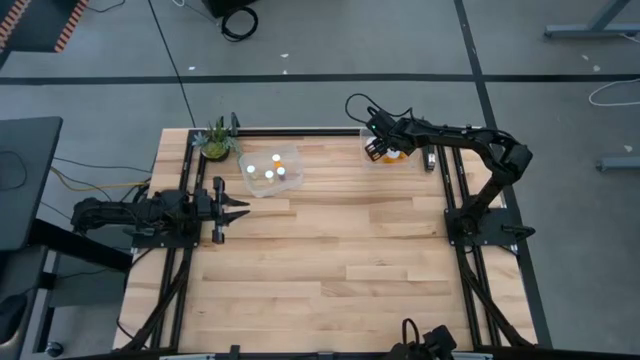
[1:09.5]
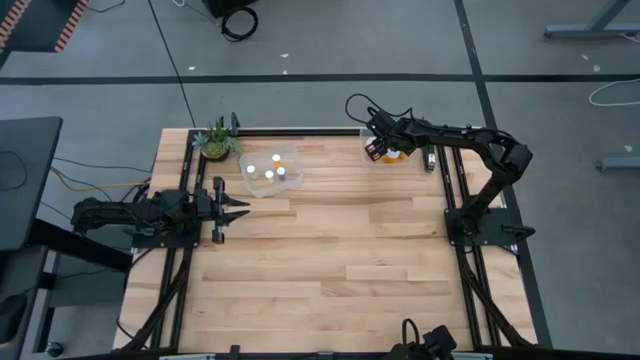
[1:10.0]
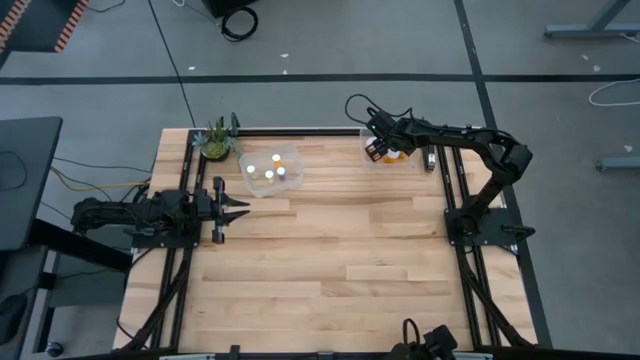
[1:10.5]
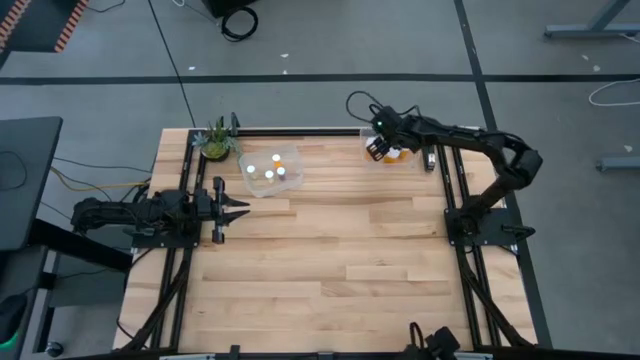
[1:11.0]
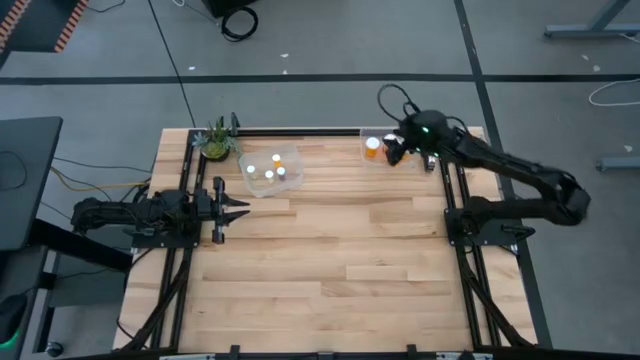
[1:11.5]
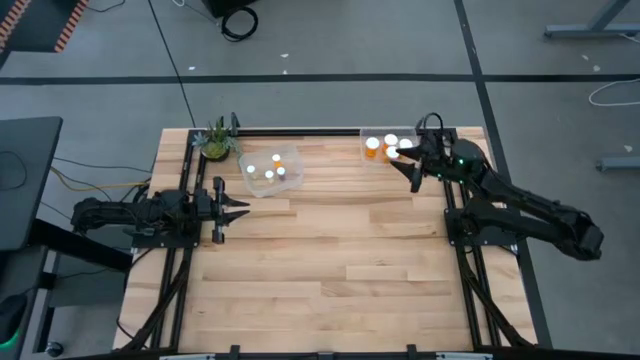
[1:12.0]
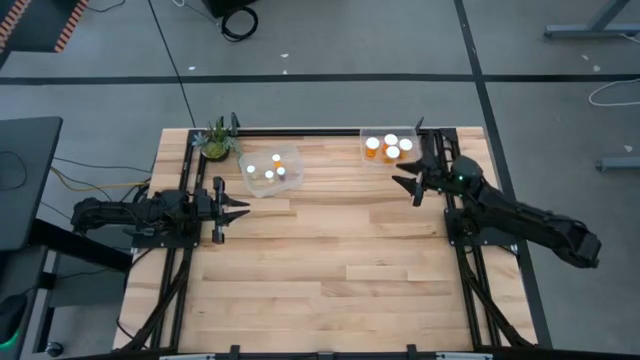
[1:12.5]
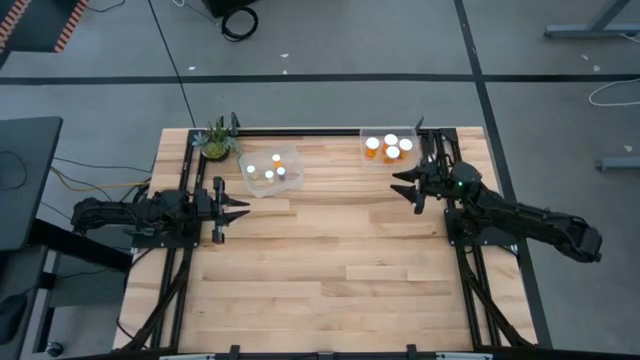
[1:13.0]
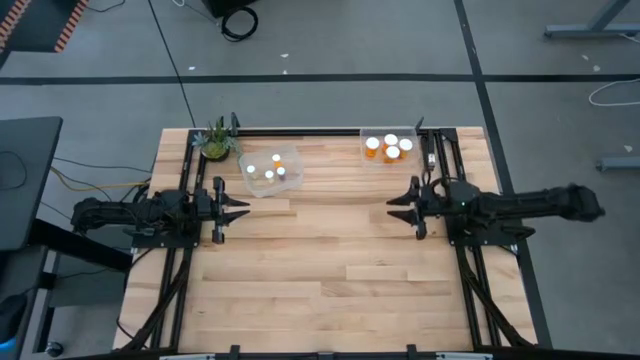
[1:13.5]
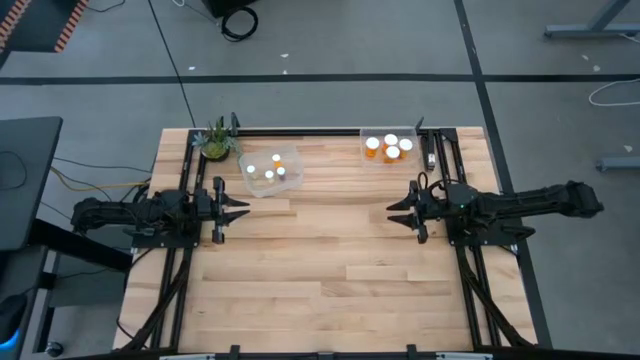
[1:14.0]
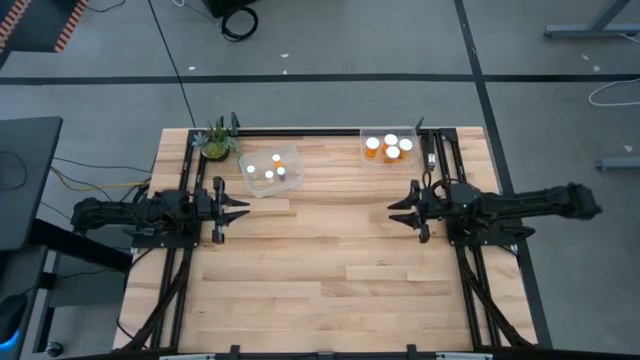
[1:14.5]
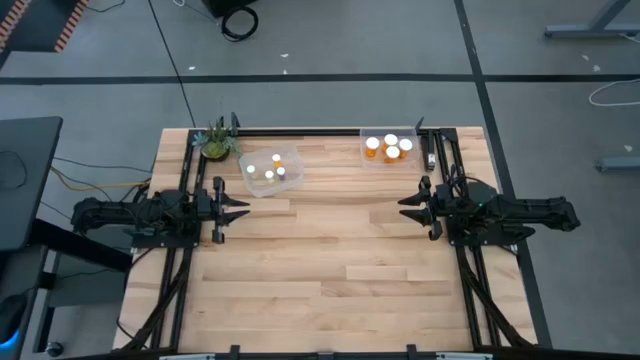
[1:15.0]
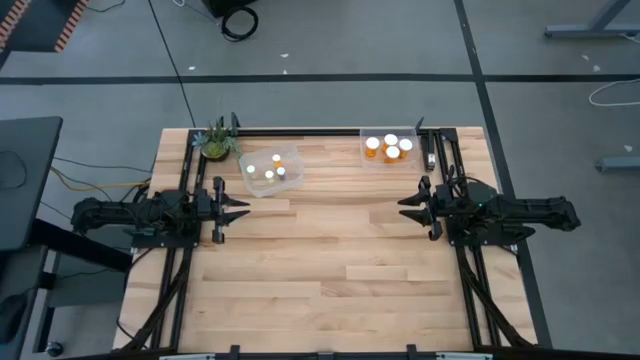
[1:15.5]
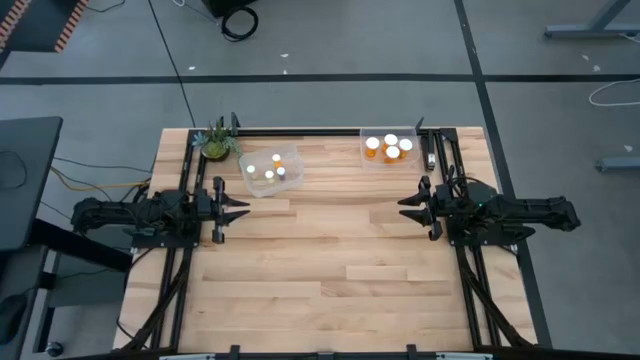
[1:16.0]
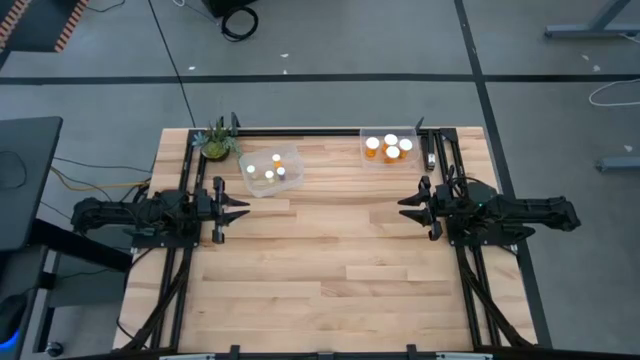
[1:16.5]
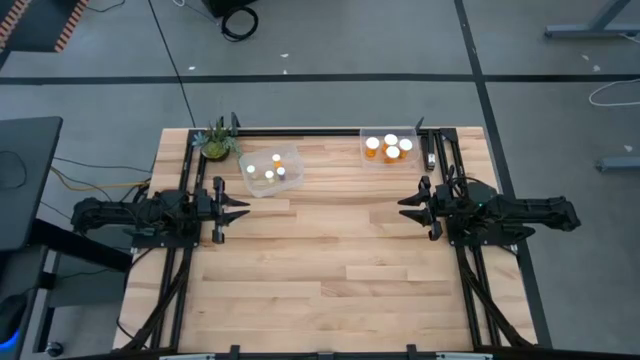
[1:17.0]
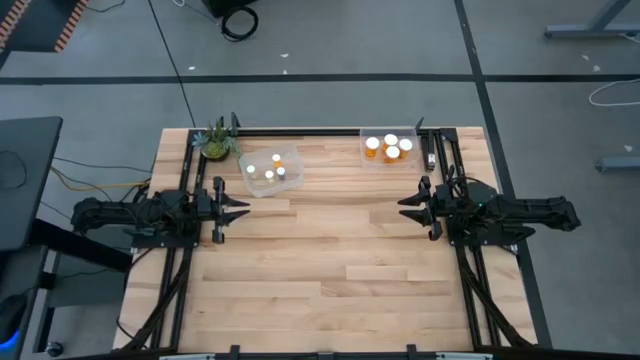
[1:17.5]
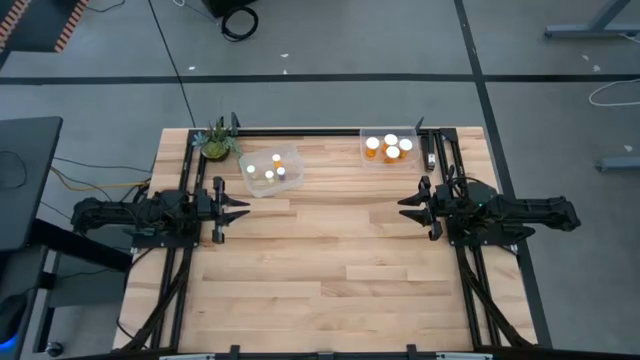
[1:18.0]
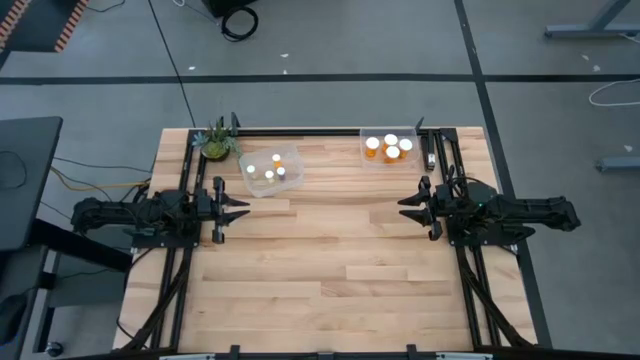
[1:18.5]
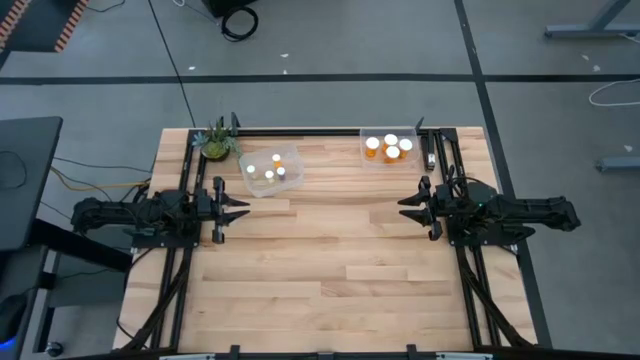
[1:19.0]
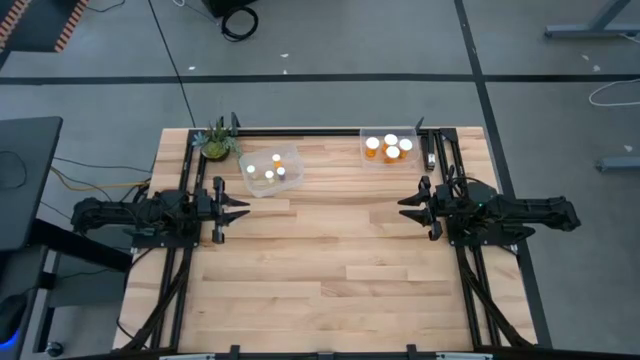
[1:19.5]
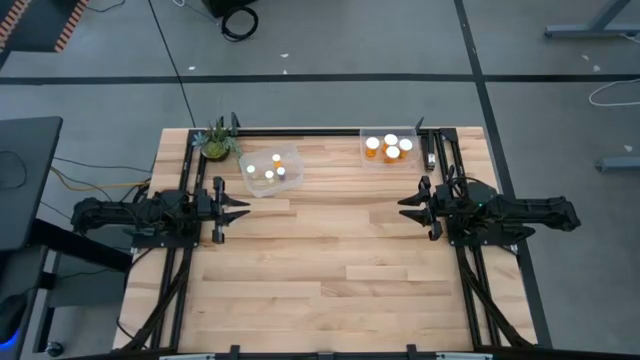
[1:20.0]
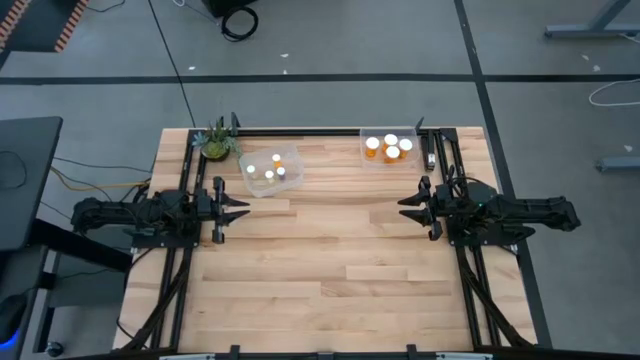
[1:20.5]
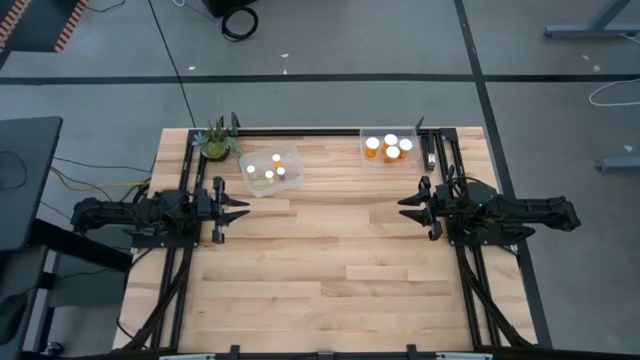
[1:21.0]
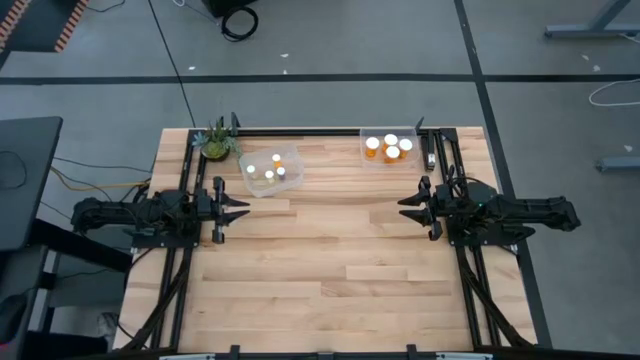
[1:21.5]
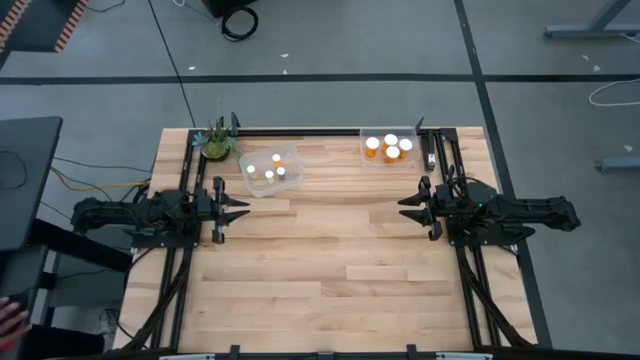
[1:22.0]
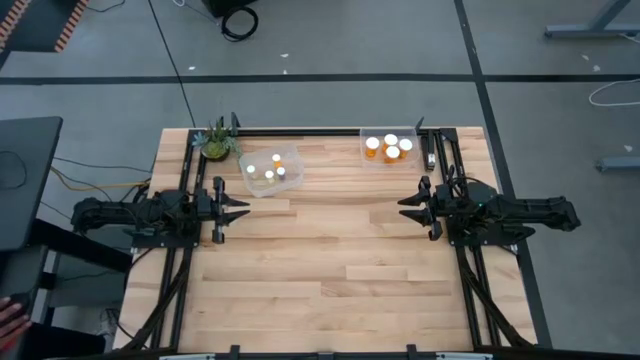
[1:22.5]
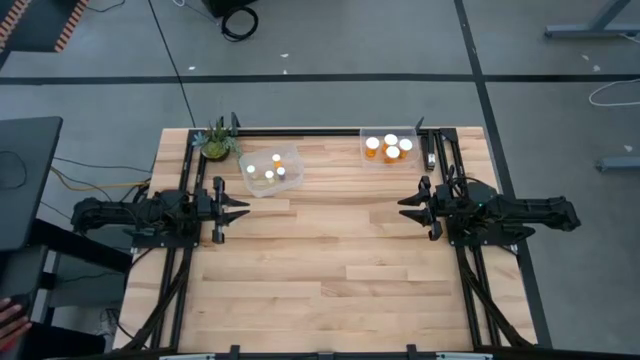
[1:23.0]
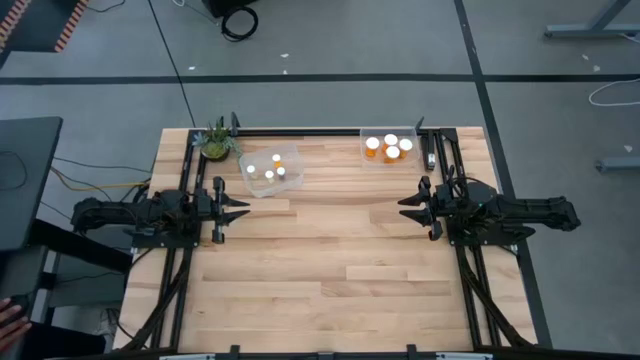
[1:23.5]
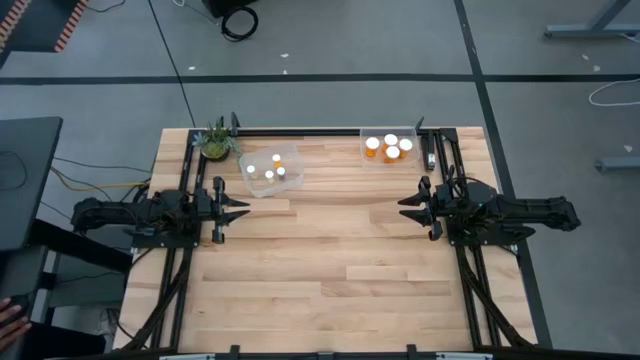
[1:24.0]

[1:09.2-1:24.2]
Task: Pick and place medicine bottles into bin by pill shape (circle, oval)
Return to Home Position

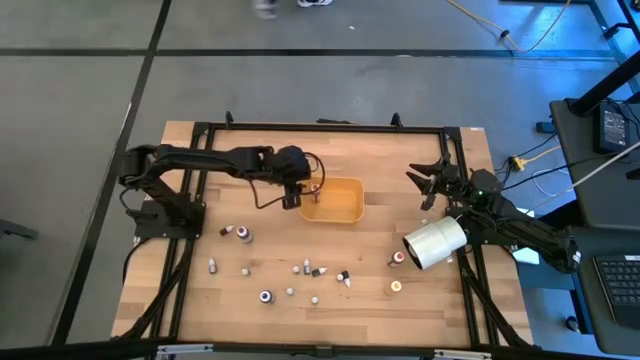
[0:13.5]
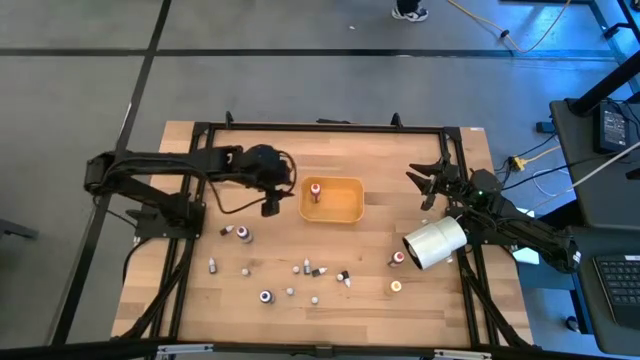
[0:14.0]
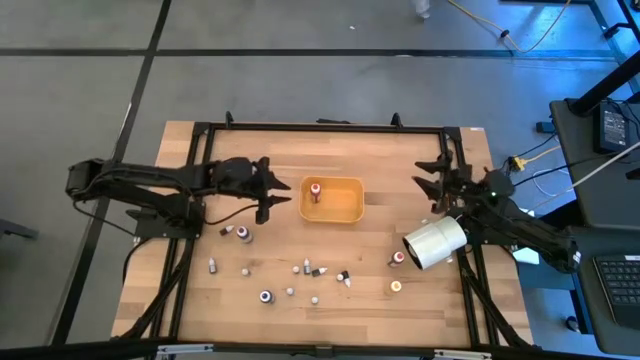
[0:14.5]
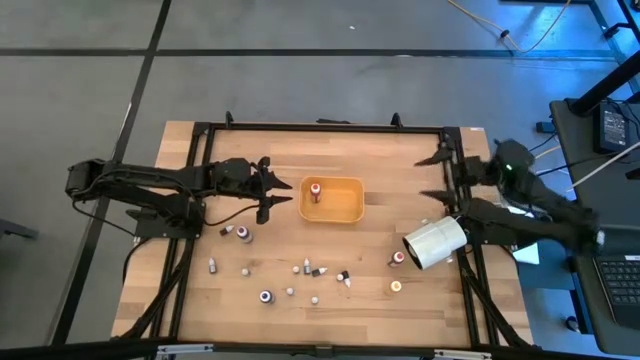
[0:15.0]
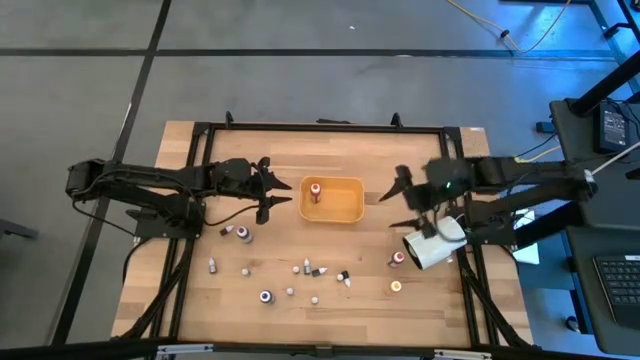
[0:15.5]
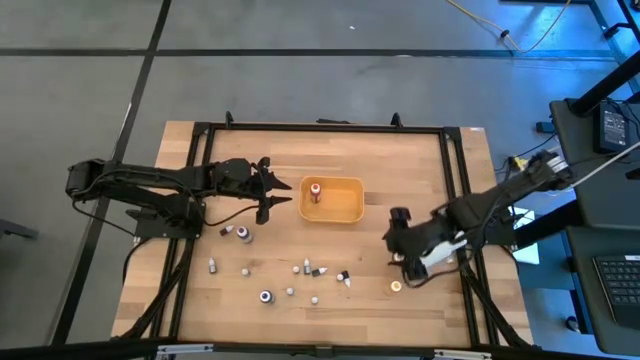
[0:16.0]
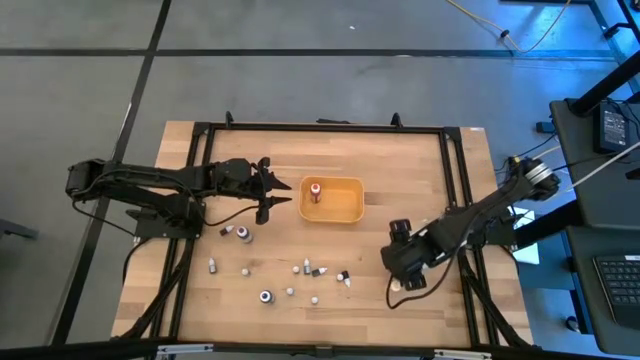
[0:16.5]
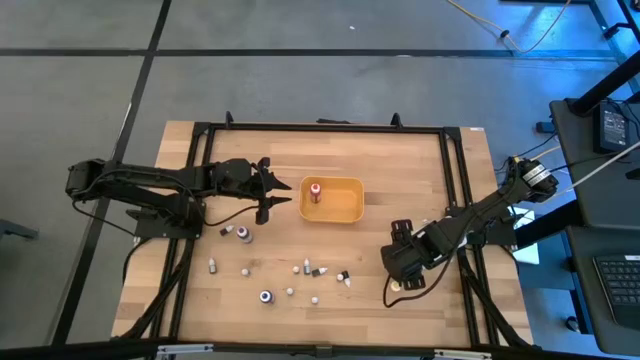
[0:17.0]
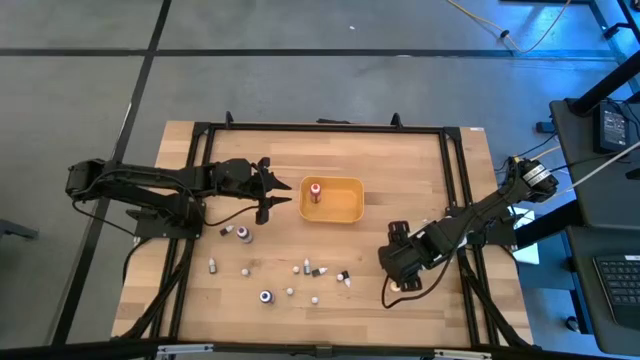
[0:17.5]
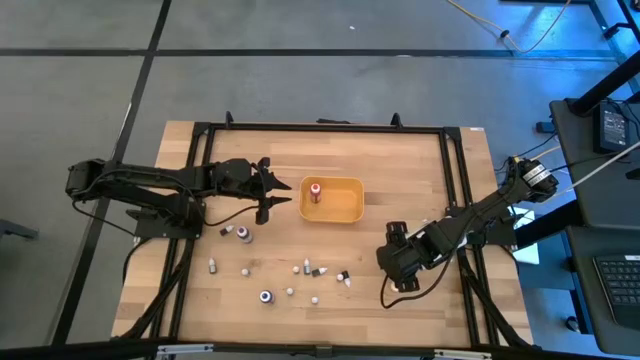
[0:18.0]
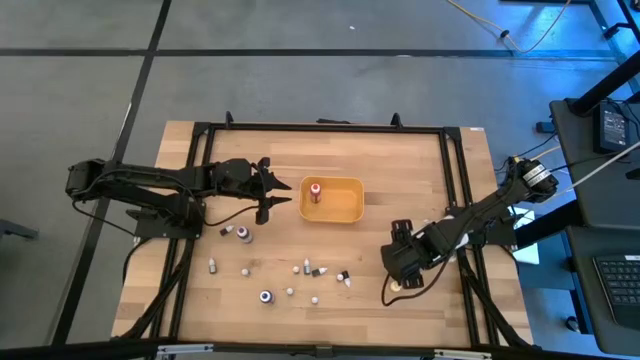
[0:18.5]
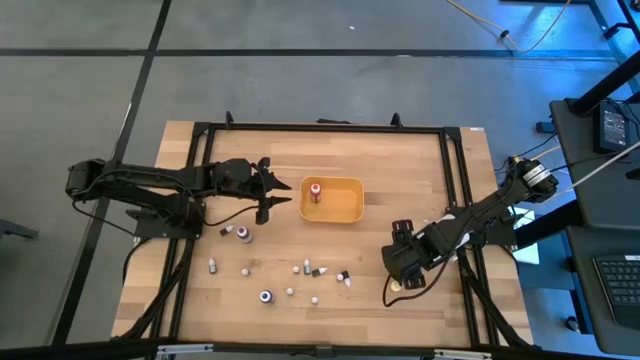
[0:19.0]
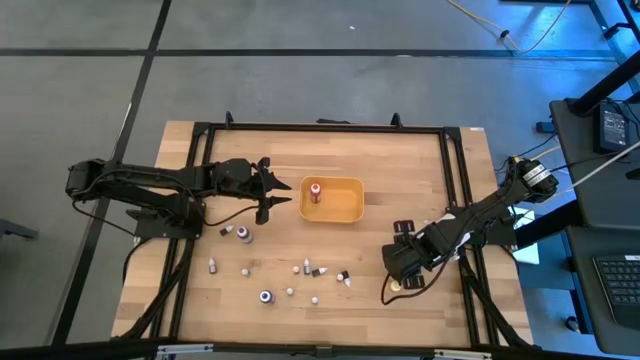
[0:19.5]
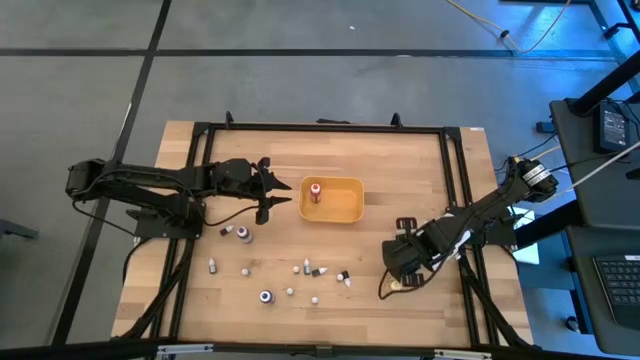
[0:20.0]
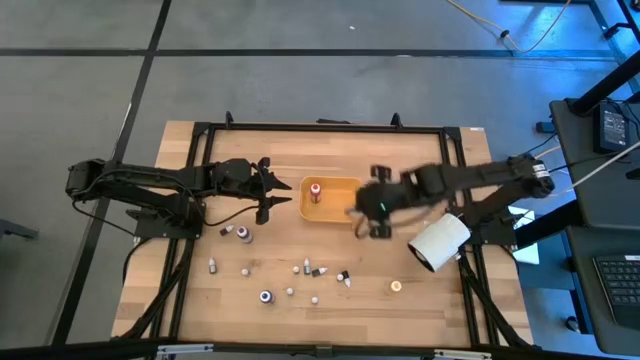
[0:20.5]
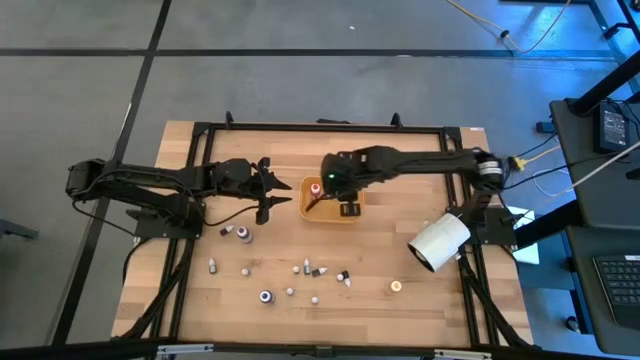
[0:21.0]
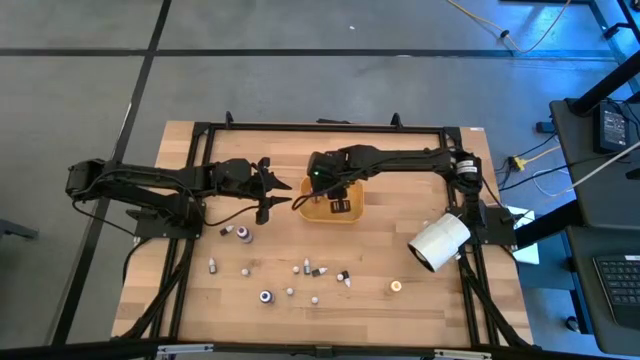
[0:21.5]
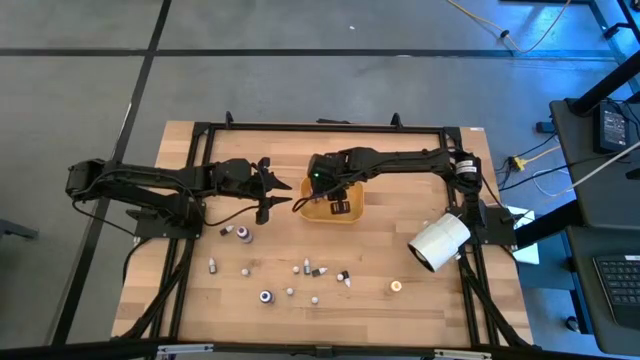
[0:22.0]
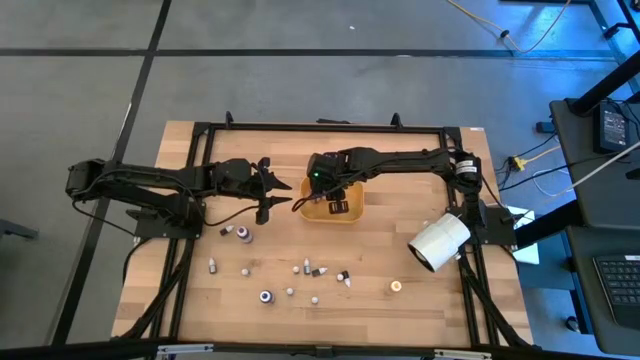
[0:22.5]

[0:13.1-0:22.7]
Task: Pick & Place food coloring
Put the big pink food coloring bottle into the yellow bin
